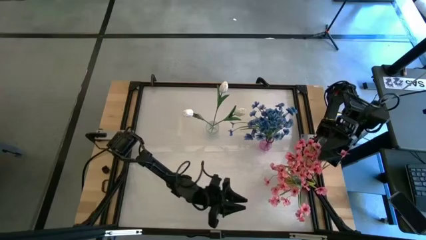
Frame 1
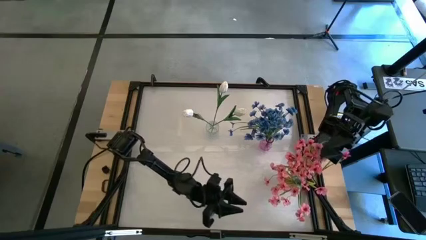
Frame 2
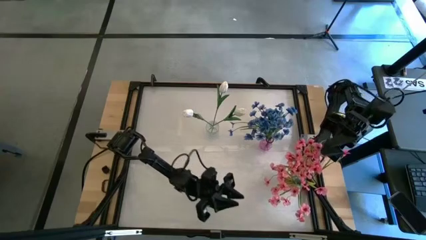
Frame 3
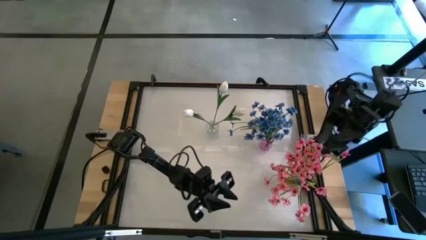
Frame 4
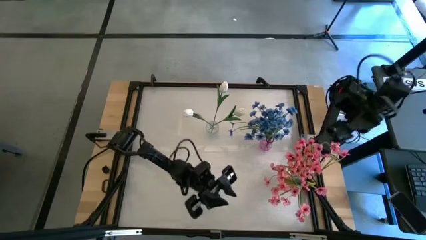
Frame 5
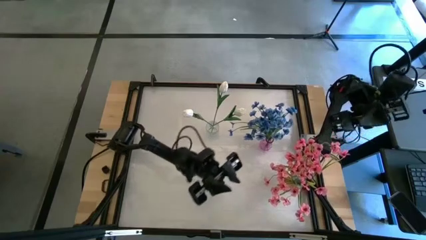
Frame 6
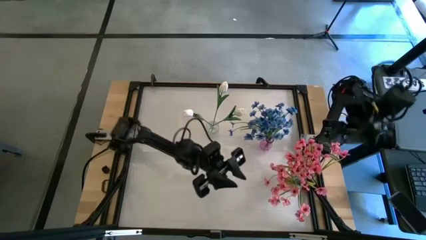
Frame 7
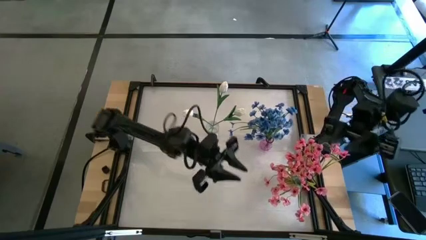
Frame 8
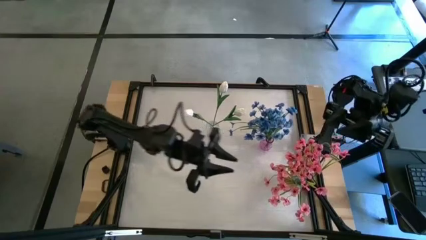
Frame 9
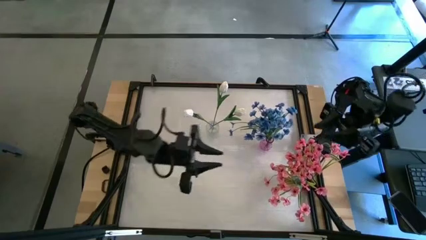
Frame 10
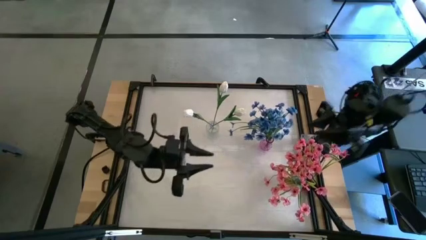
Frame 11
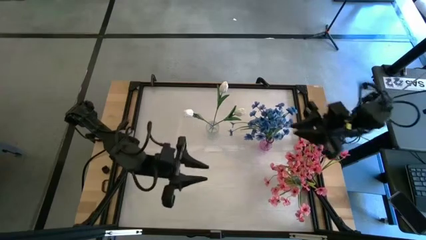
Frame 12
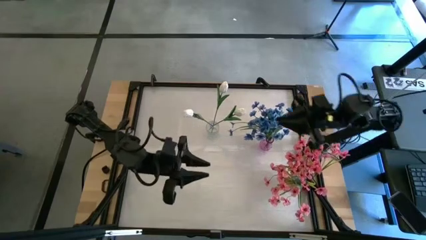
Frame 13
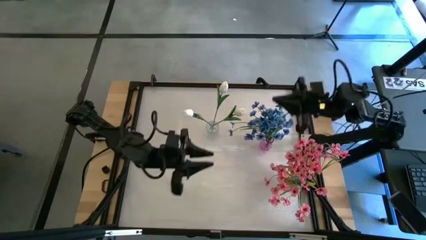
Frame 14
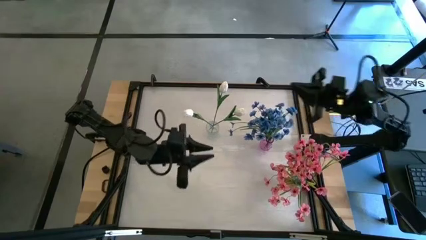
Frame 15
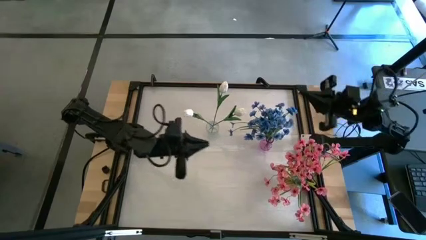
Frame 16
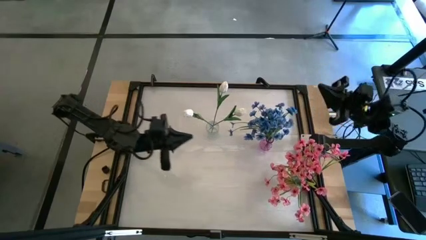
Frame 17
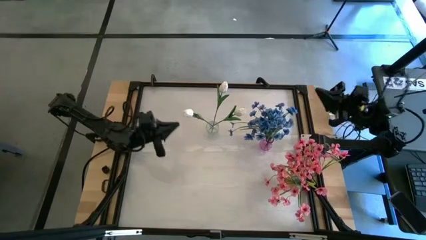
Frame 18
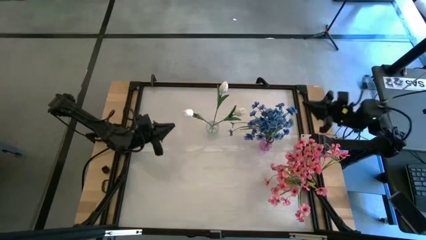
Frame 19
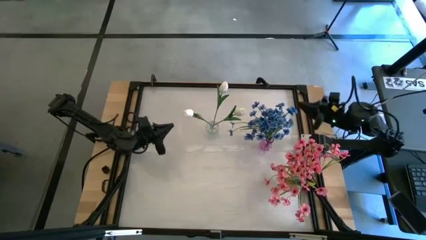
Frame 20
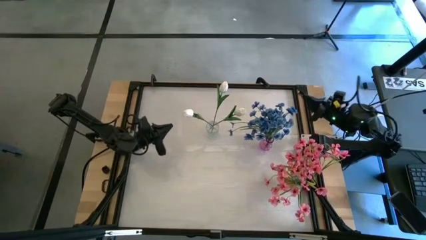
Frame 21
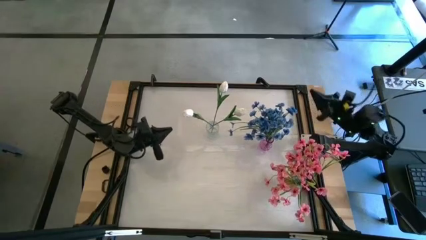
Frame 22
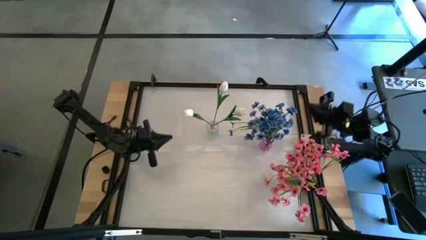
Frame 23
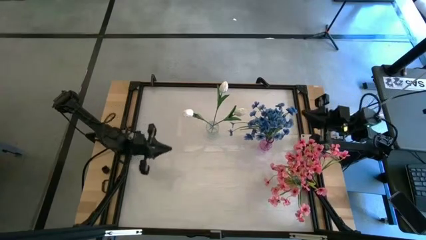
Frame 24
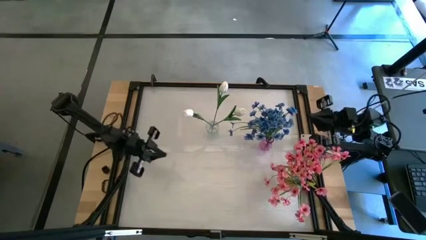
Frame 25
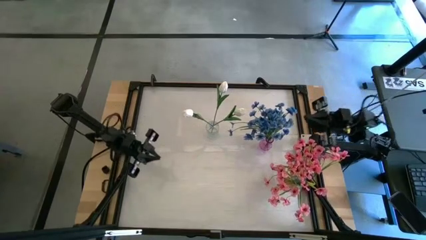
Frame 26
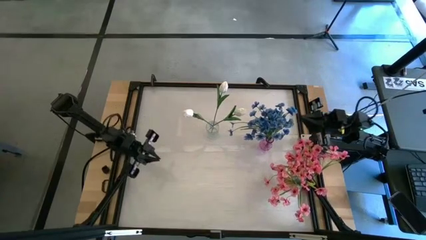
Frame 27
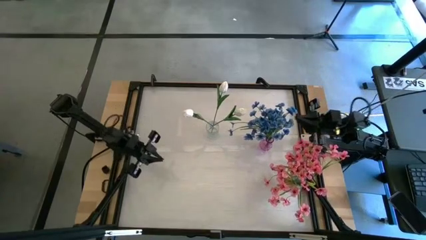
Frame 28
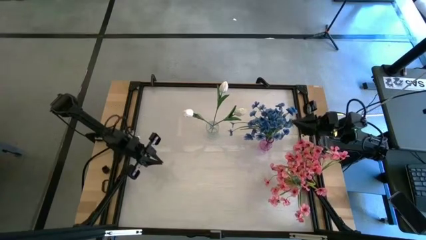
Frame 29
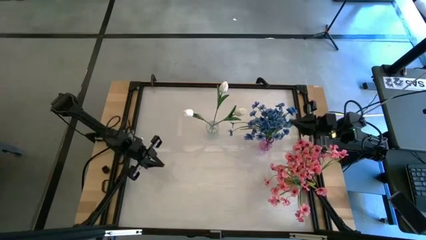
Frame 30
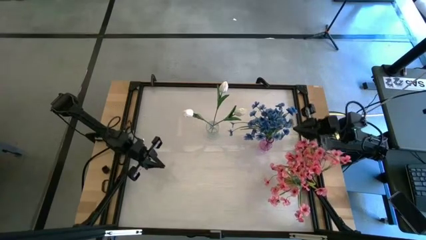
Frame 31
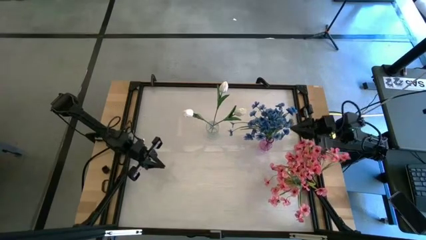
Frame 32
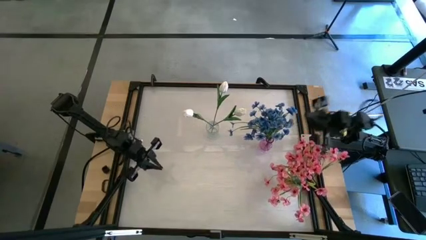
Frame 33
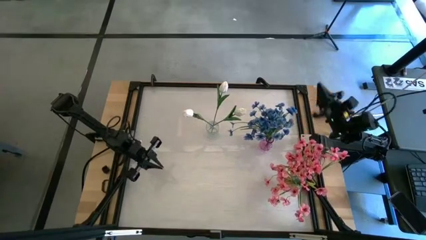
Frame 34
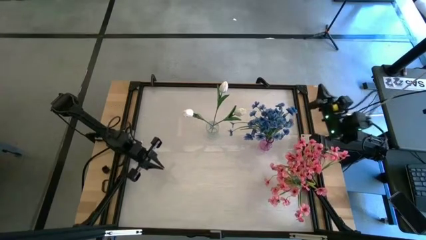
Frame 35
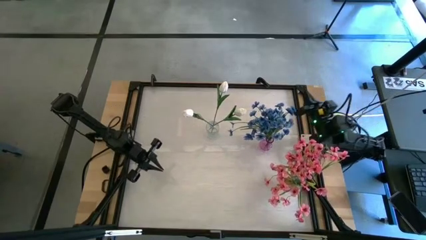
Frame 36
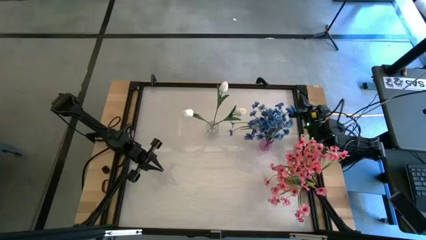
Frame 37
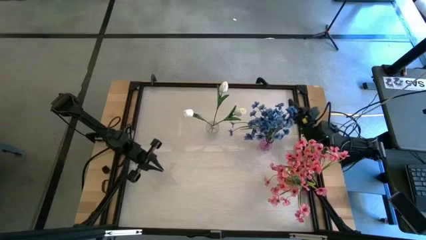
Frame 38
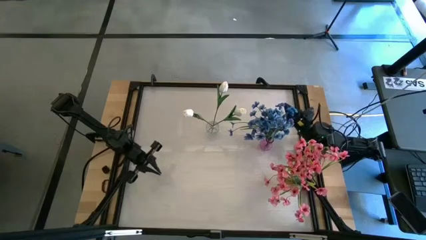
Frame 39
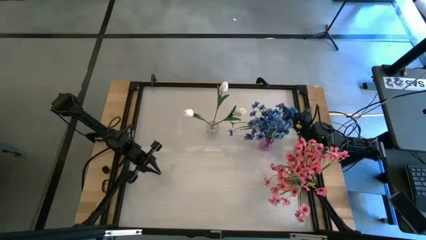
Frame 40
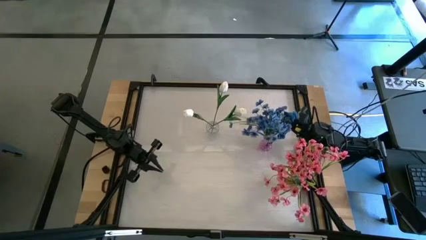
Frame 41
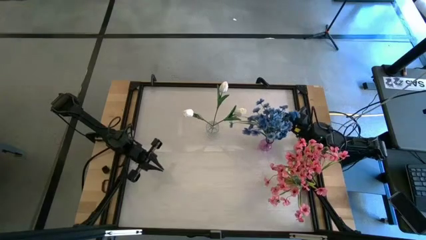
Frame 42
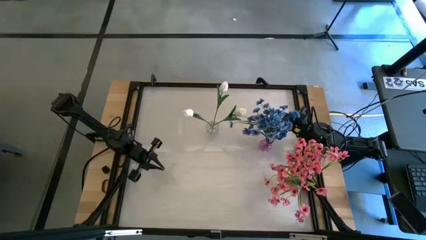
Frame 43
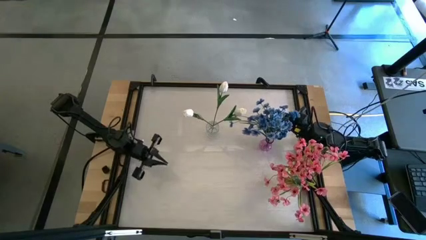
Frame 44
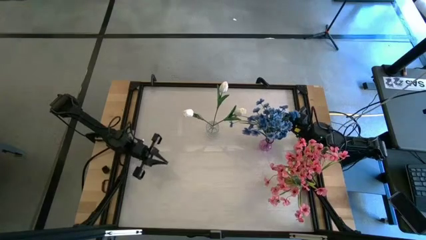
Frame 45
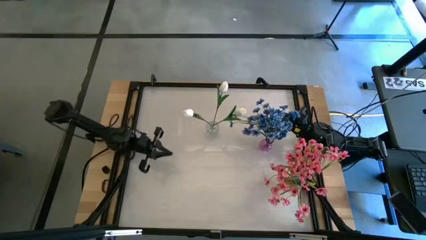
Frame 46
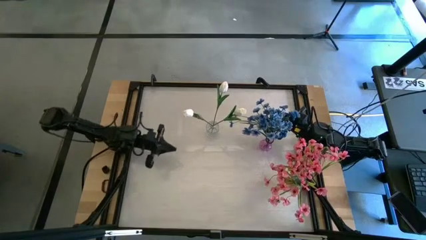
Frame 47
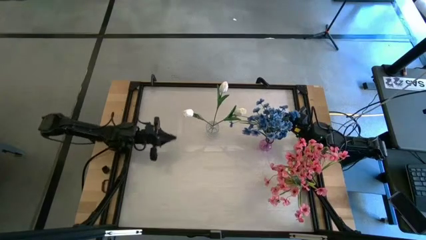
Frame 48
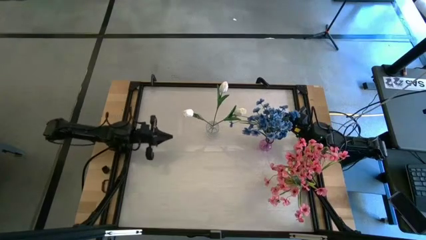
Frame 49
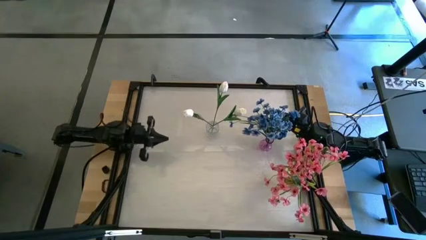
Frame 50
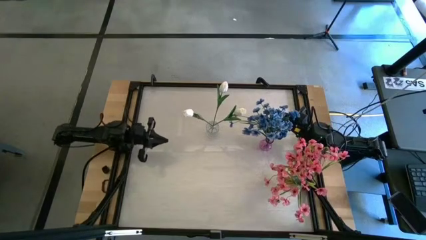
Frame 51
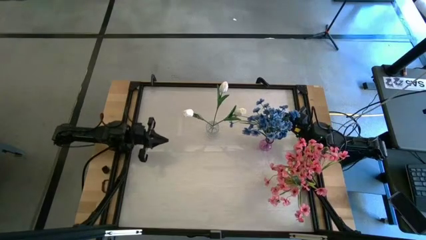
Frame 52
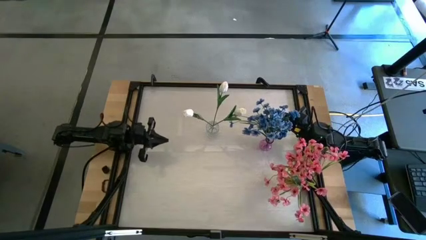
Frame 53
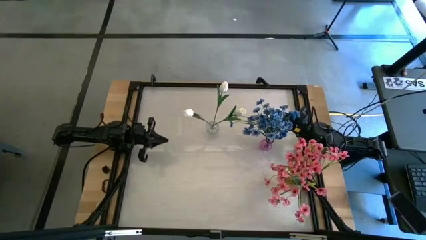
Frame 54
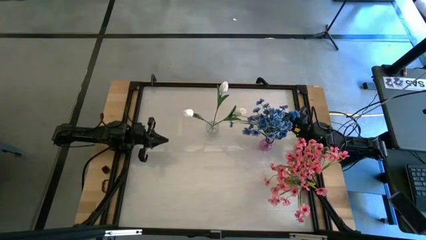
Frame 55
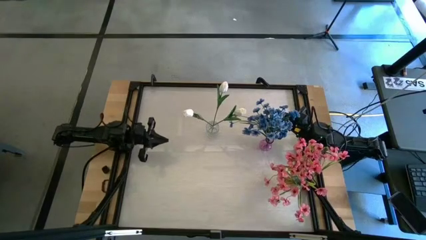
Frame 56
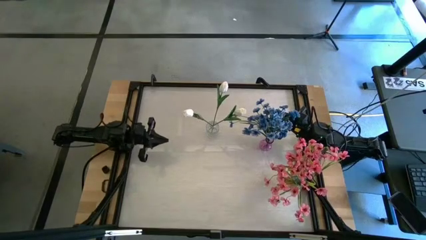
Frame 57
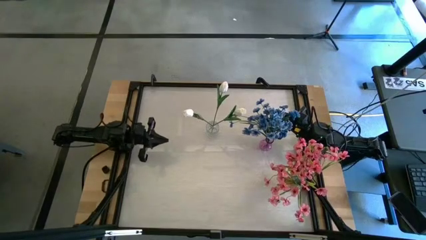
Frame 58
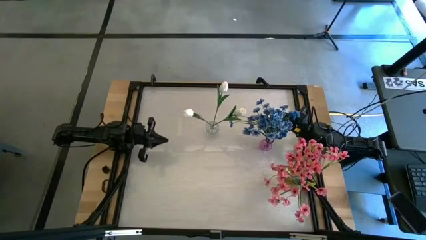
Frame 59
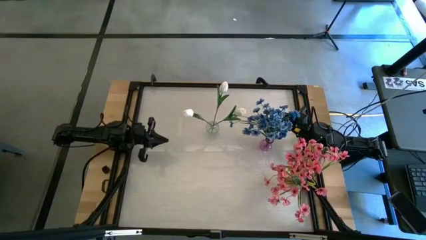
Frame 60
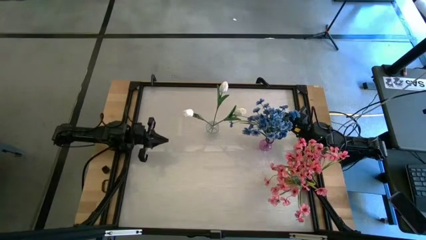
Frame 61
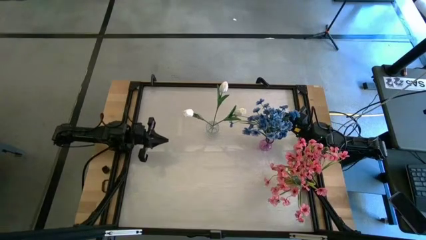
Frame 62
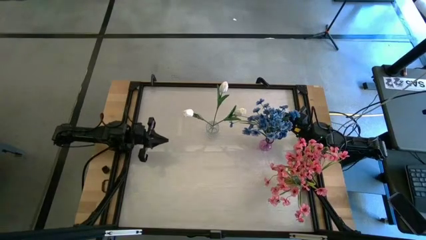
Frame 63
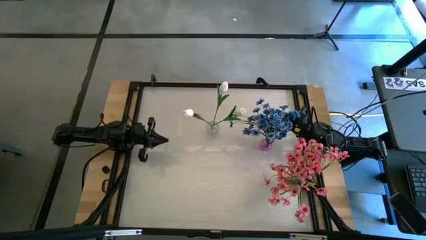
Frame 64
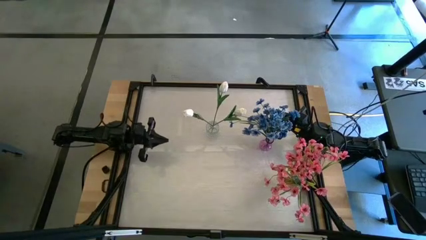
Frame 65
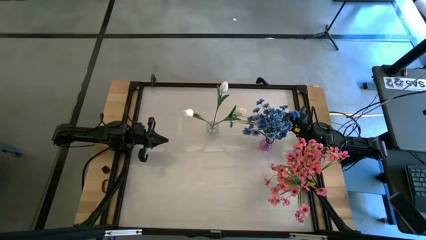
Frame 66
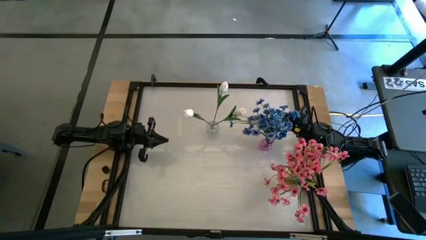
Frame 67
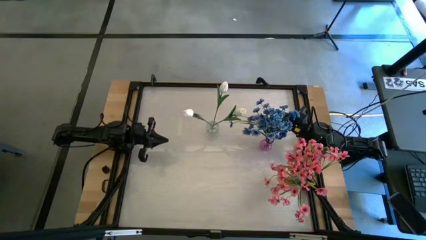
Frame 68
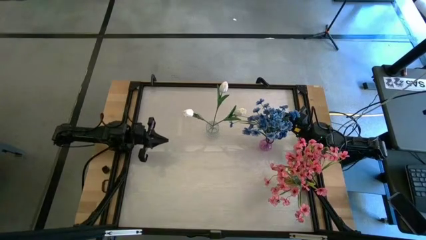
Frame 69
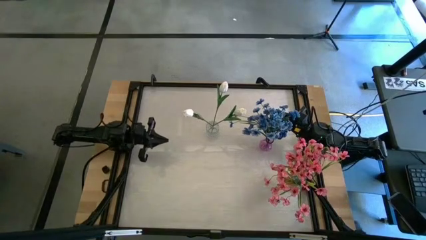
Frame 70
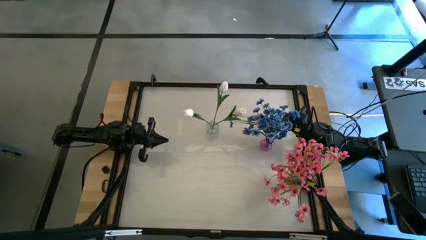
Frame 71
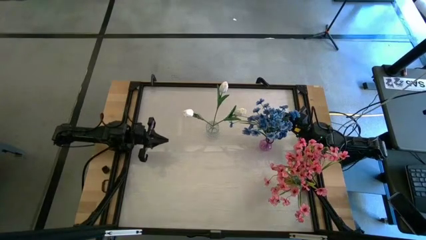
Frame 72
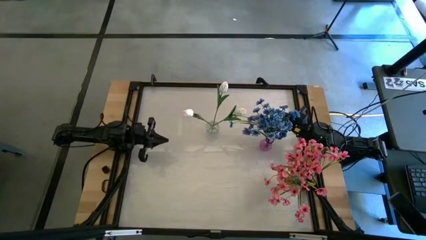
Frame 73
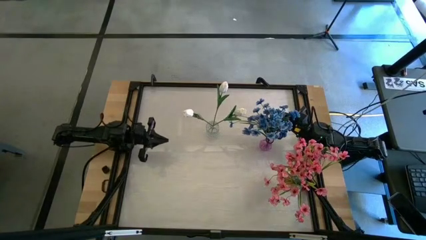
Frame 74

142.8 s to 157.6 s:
Task: Sort flowers into vase by color
Return to Home Position
